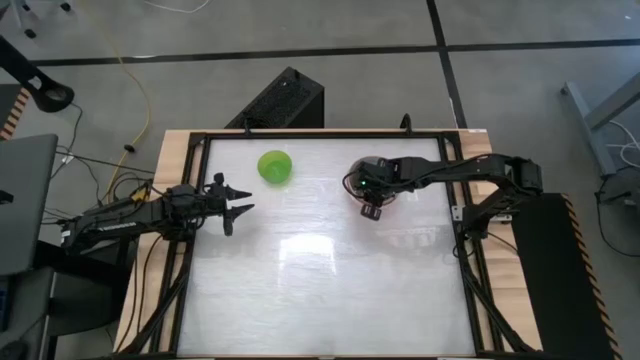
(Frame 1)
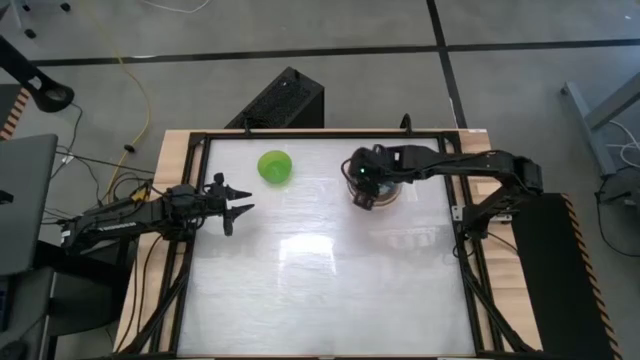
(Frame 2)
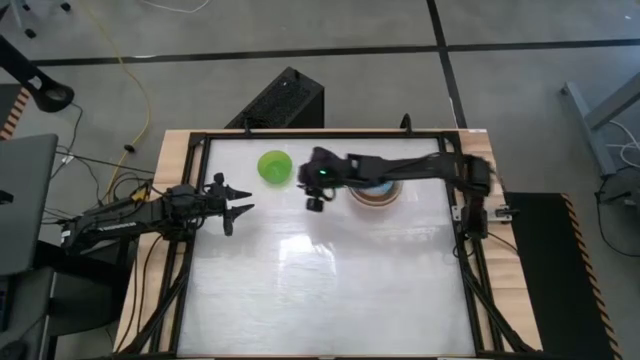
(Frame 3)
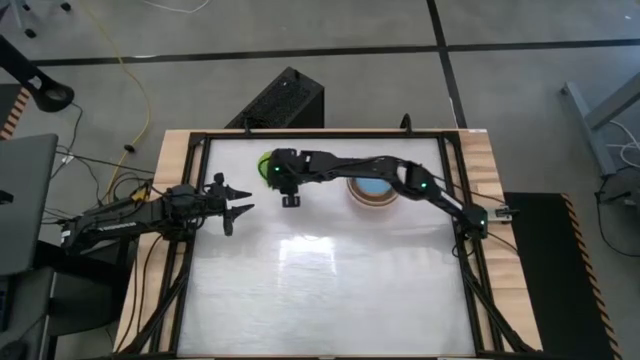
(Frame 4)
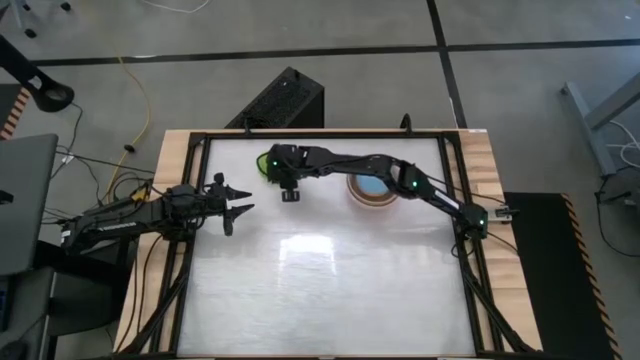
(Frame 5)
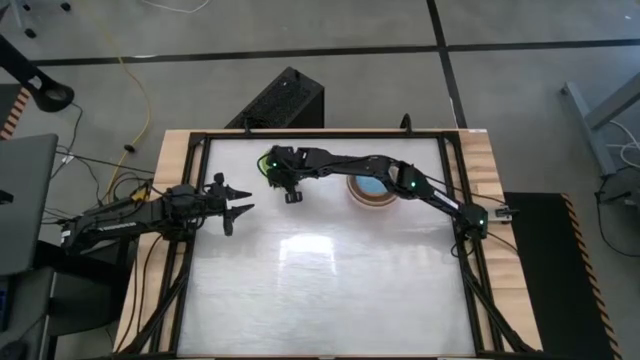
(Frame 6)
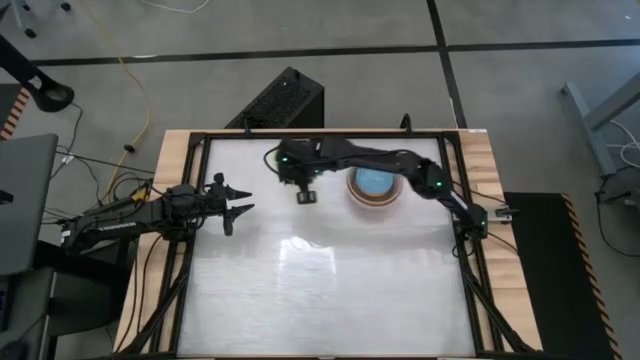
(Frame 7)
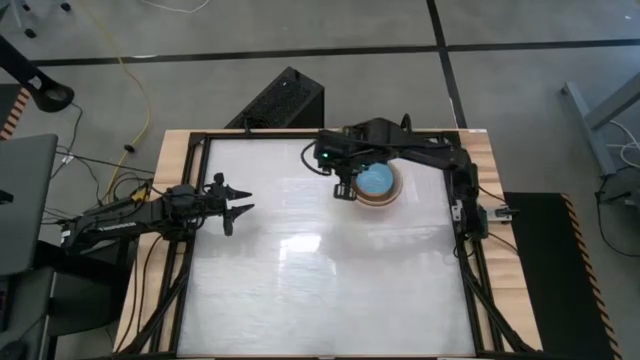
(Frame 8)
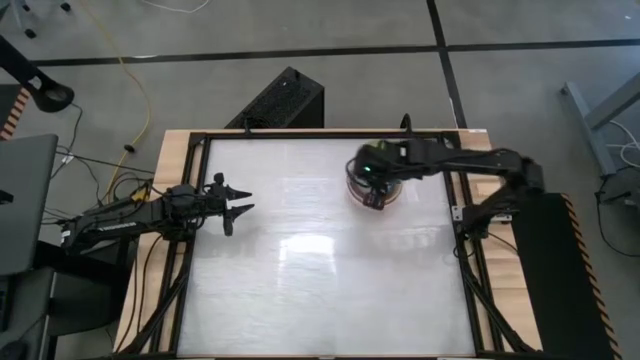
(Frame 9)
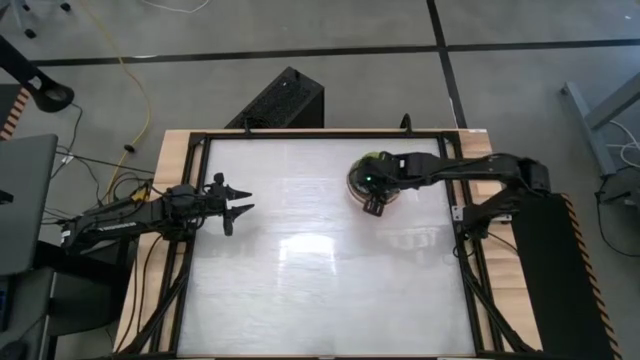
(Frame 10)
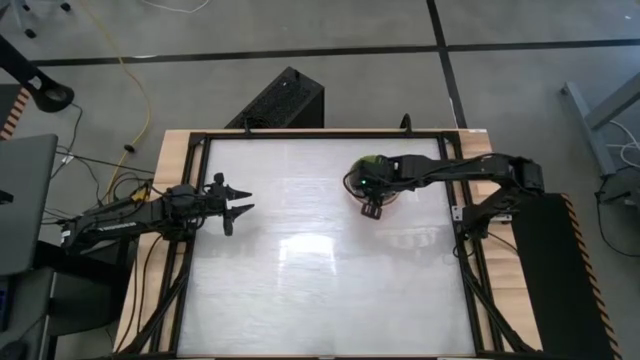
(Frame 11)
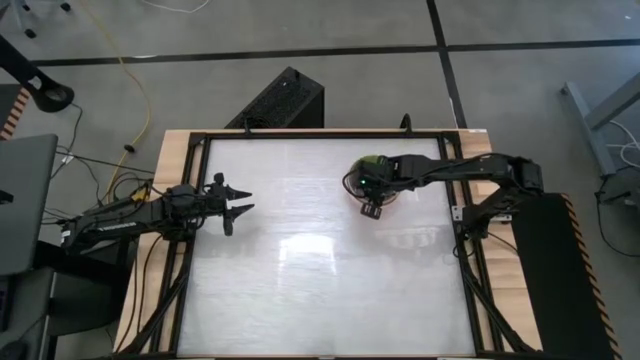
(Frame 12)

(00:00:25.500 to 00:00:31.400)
Stack the green bowl on top of the blue patterned bowl

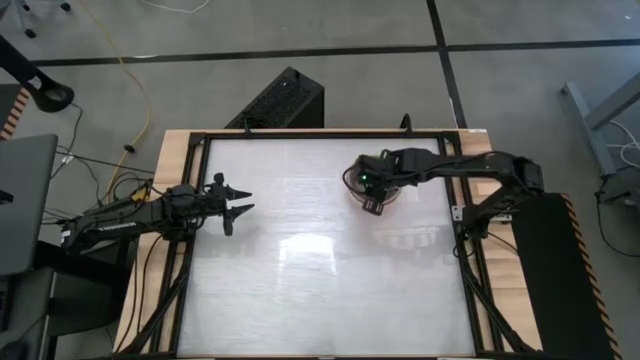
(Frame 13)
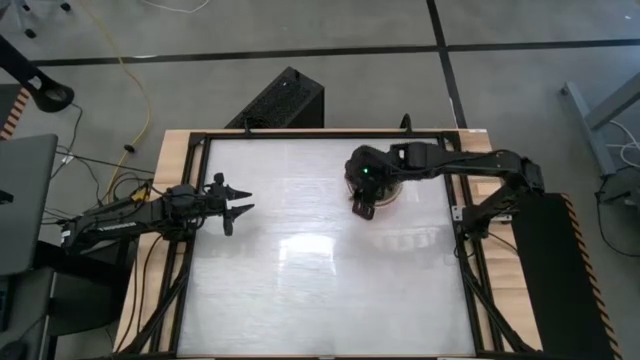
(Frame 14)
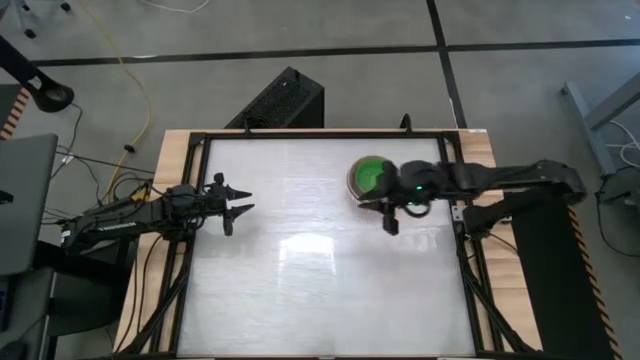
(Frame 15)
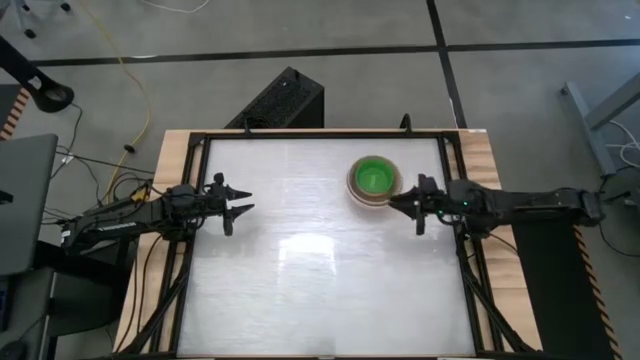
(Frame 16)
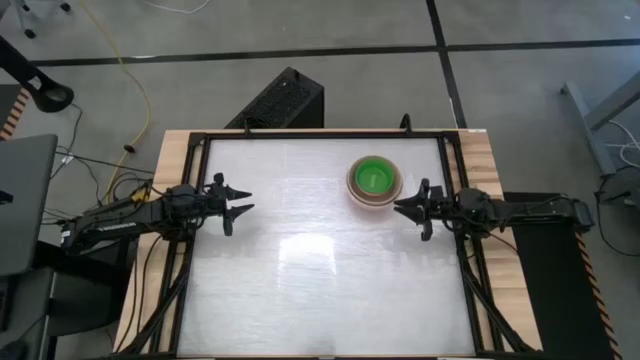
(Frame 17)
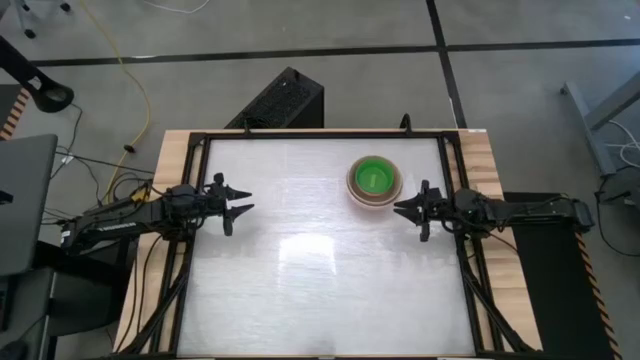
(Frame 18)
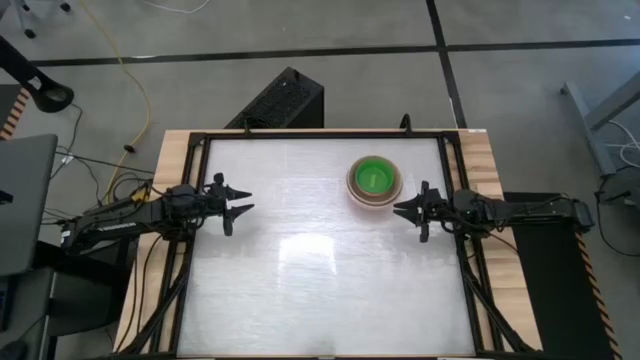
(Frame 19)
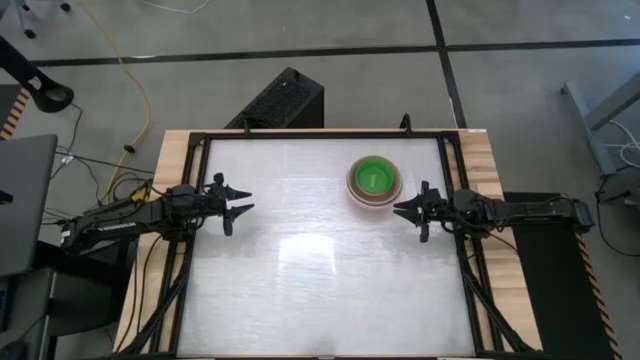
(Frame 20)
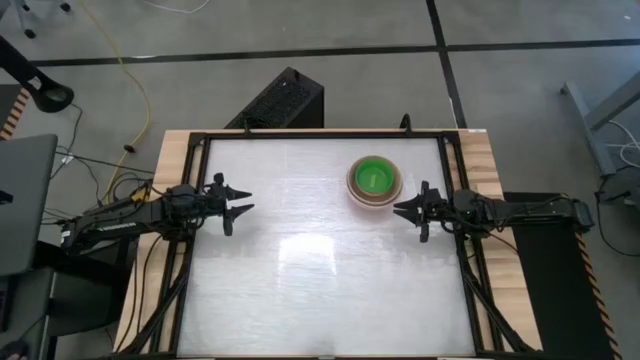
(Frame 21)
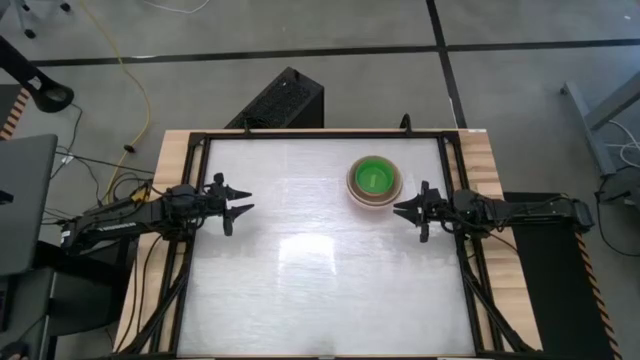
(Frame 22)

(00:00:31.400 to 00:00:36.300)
Return to Home Position

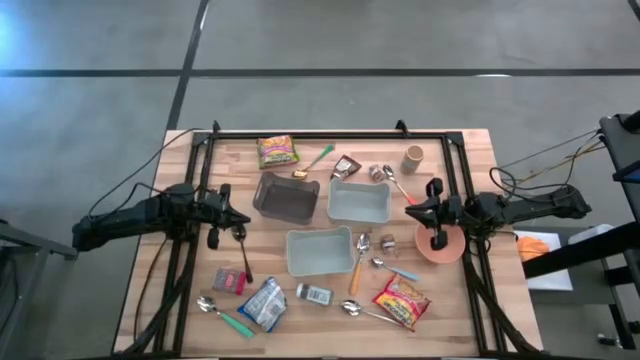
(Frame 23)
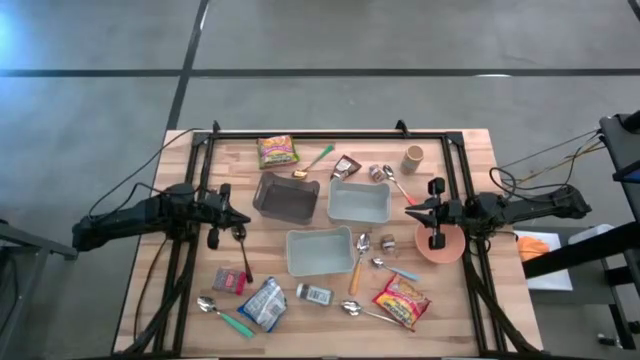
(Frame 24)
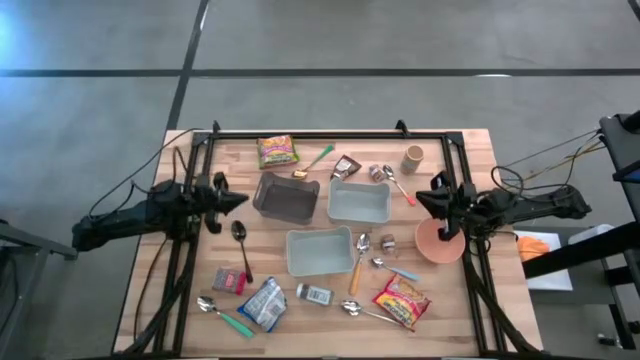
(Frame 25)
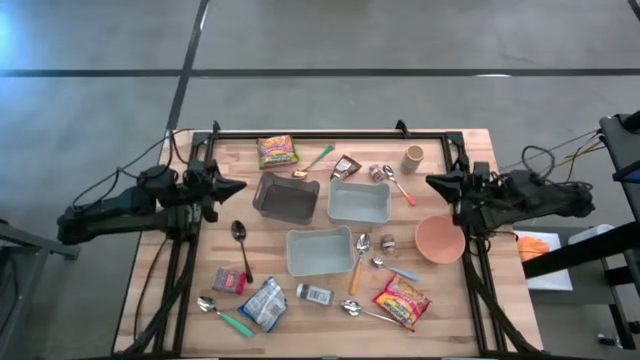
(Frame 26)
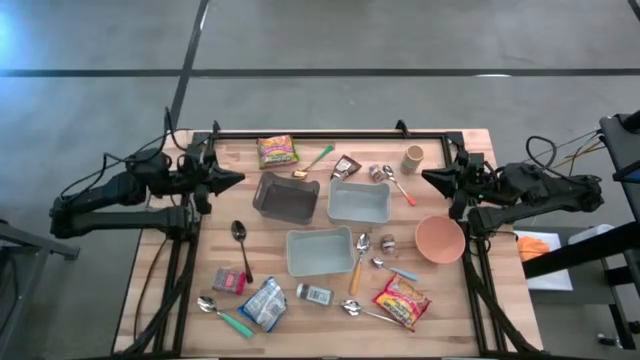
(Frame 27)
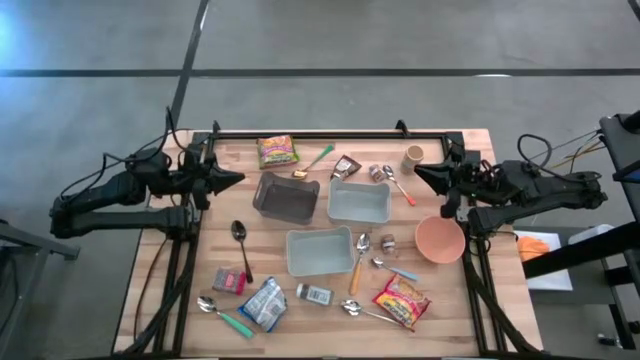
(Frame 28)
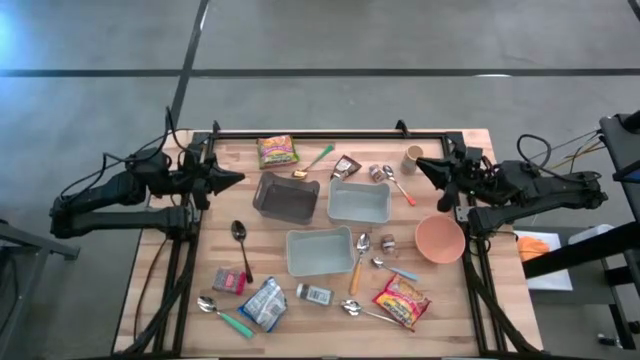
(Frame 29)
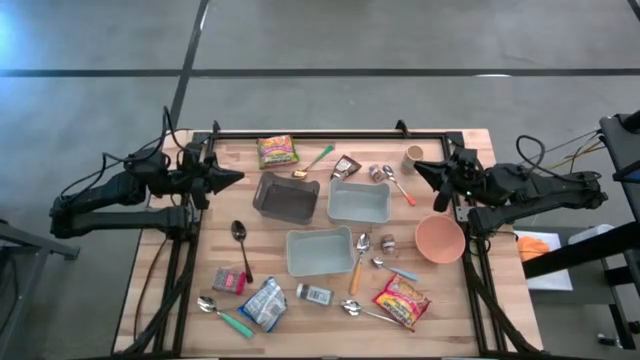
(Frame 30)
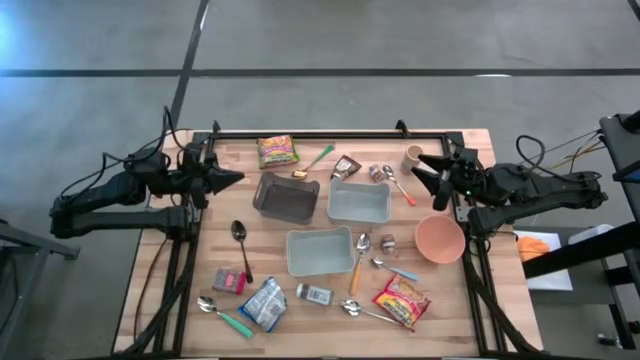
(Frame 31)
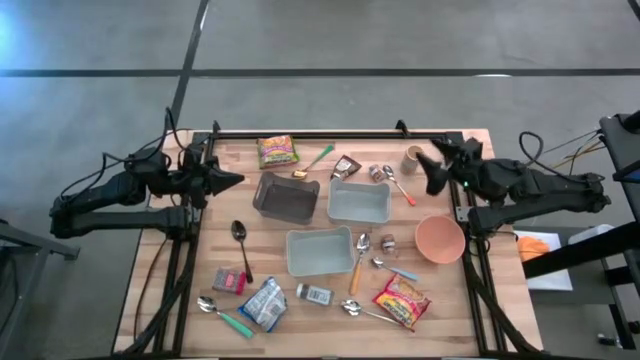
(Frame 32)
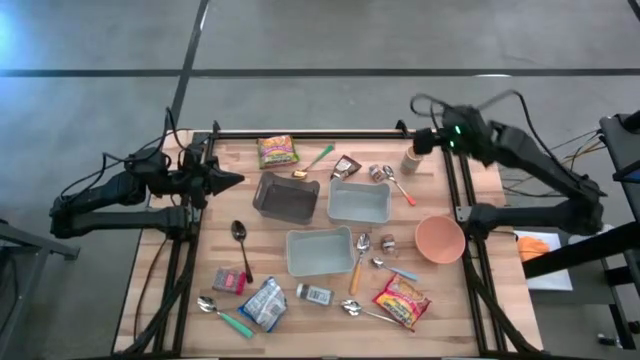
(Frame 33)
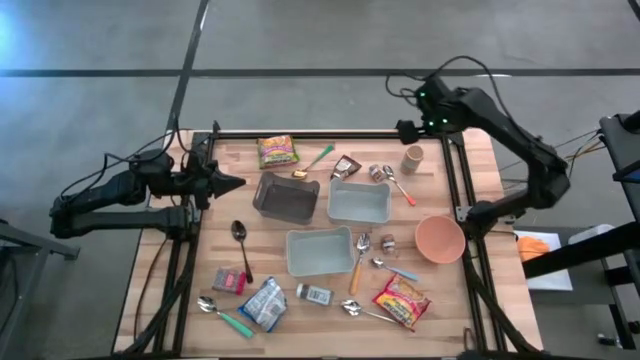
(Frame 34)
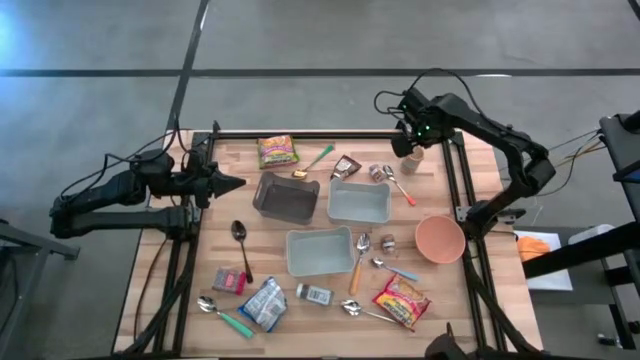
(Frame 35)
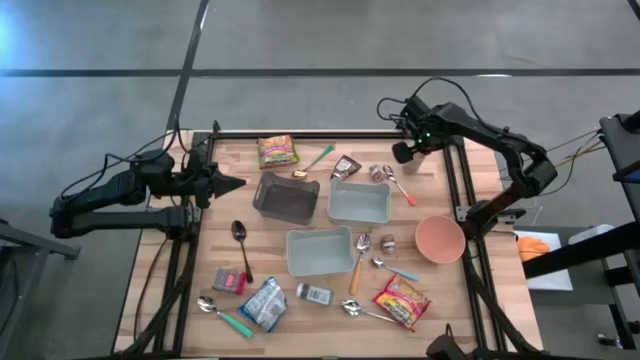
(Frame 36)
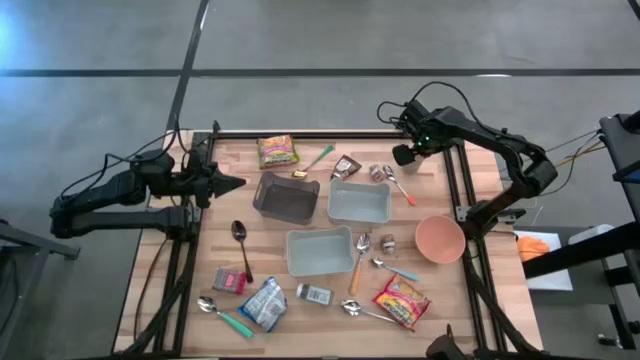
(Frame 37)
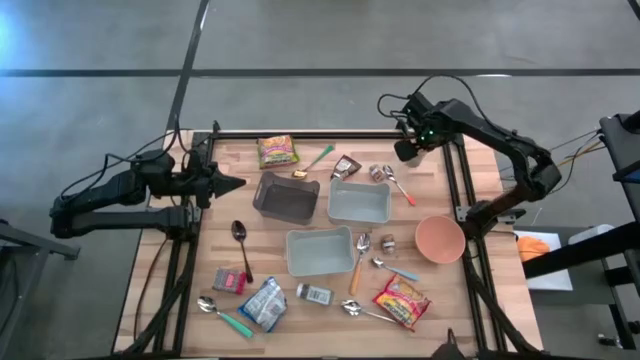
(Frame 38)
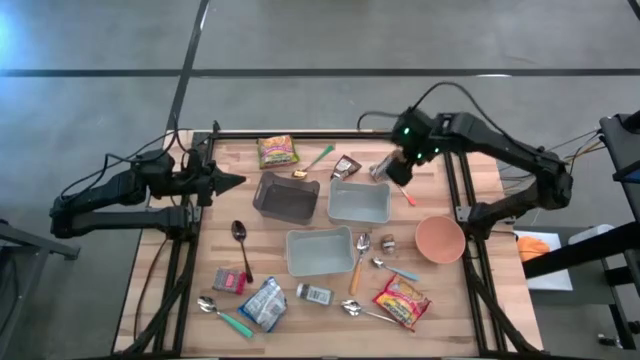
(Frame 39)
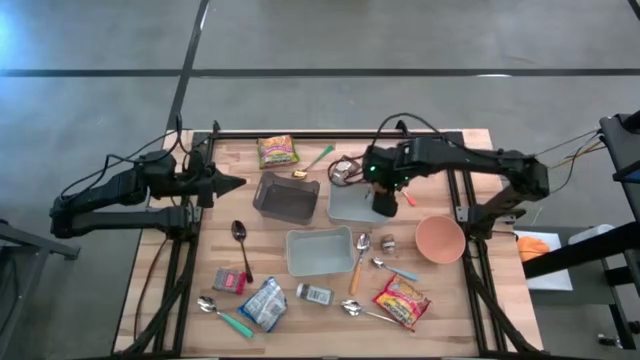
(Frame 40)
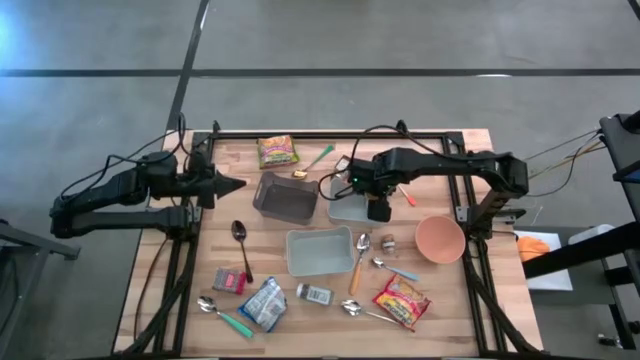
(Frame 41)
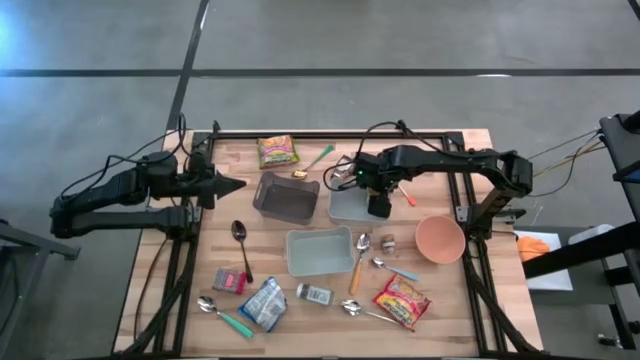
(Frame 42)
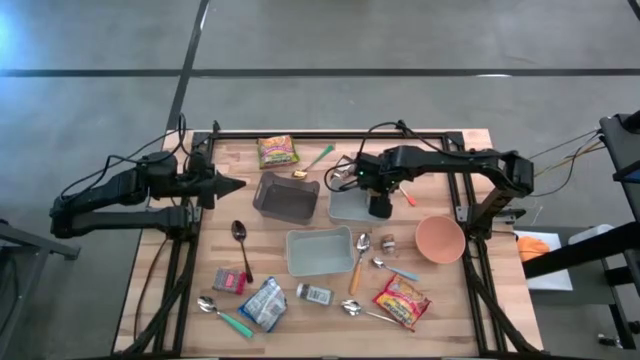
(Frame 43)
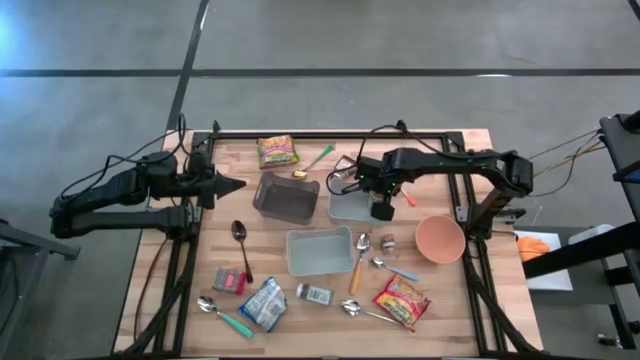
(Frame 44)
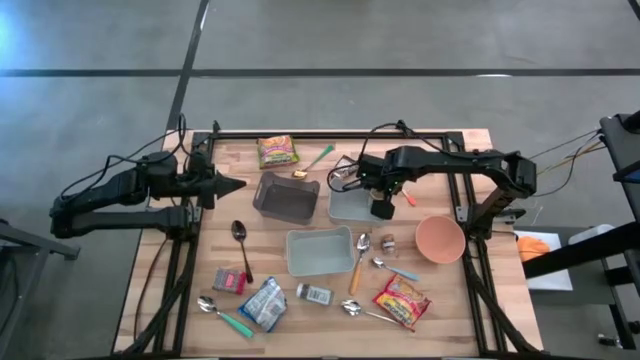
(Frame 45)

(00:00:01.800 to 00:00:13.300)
Put the gold seasoning bottle into the top gray bin
